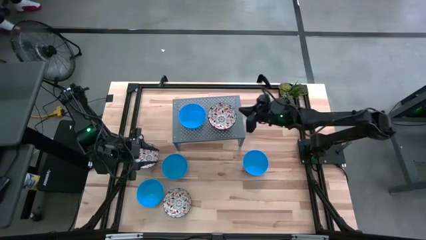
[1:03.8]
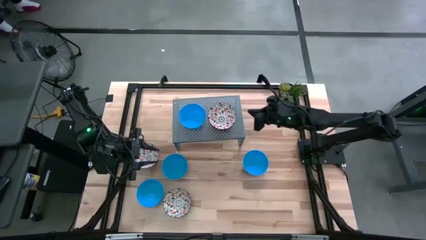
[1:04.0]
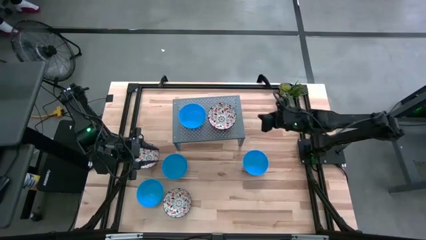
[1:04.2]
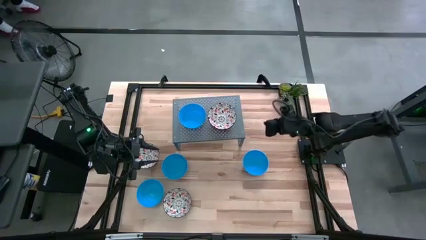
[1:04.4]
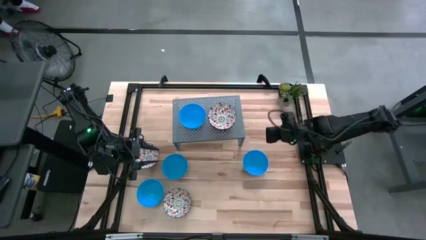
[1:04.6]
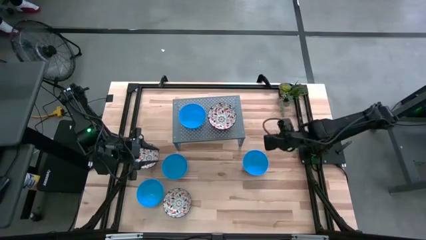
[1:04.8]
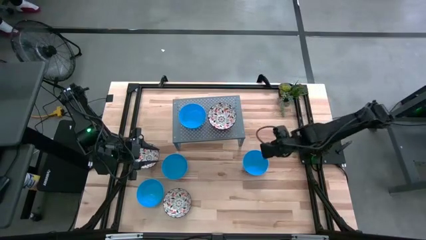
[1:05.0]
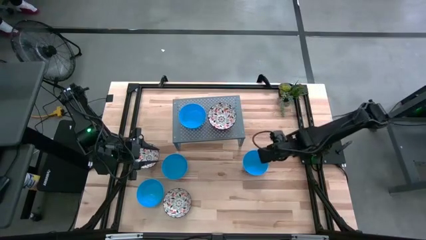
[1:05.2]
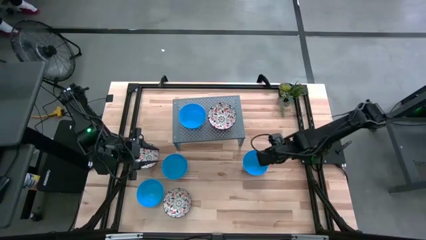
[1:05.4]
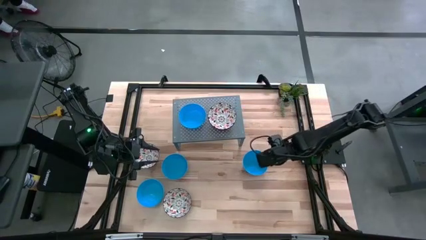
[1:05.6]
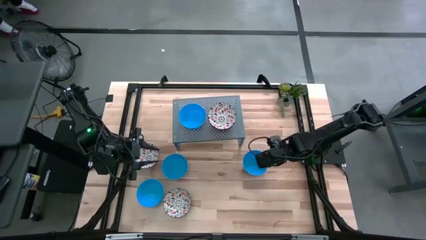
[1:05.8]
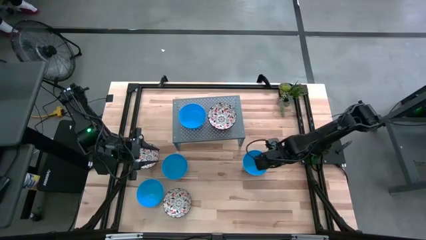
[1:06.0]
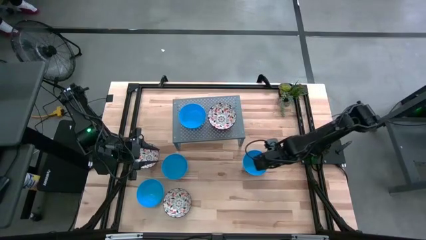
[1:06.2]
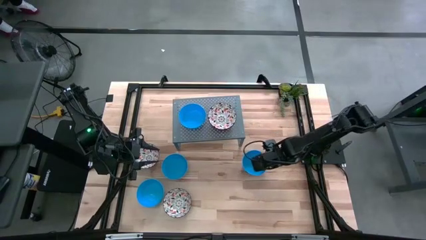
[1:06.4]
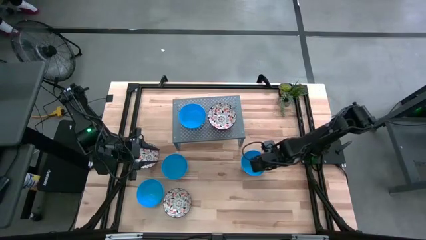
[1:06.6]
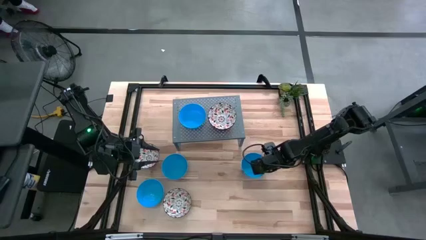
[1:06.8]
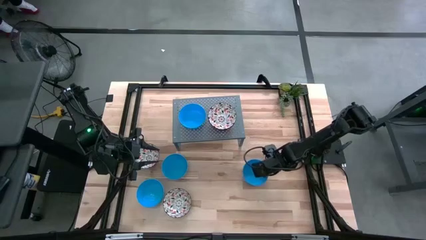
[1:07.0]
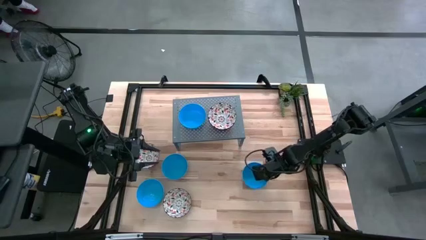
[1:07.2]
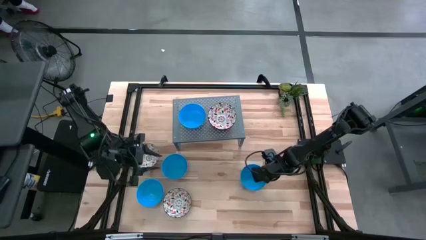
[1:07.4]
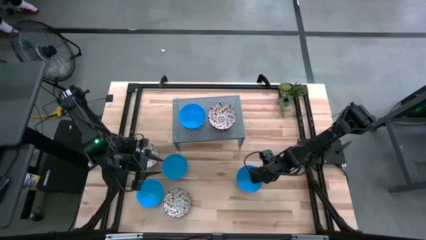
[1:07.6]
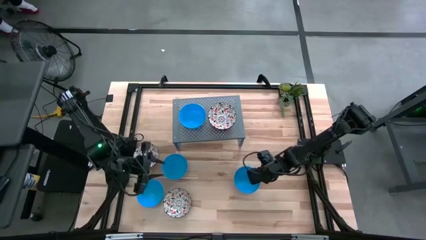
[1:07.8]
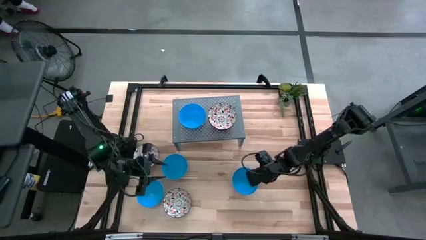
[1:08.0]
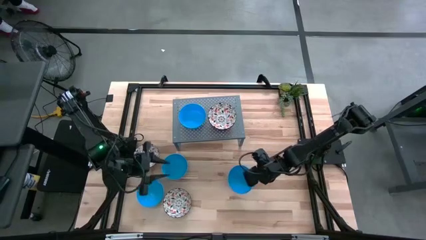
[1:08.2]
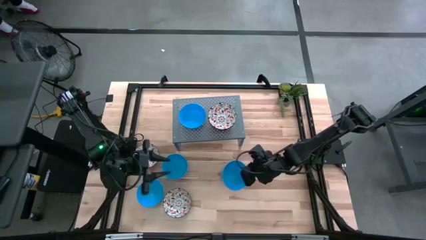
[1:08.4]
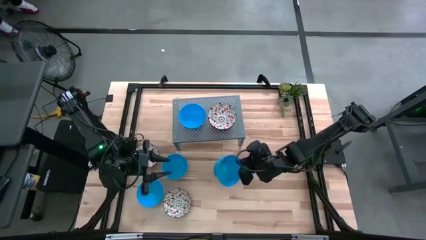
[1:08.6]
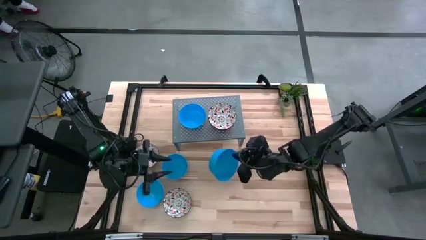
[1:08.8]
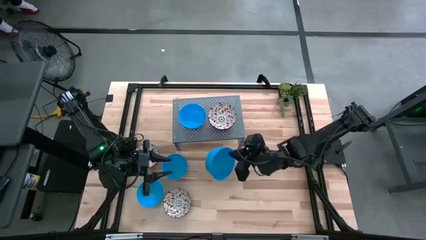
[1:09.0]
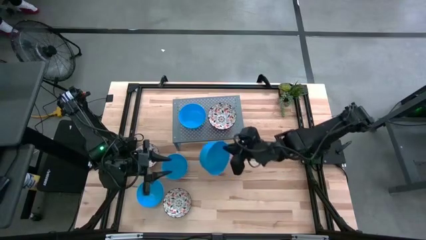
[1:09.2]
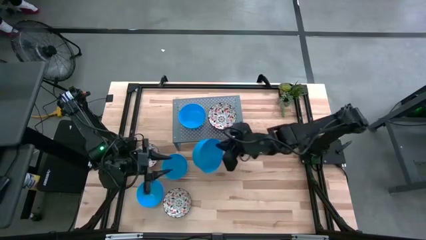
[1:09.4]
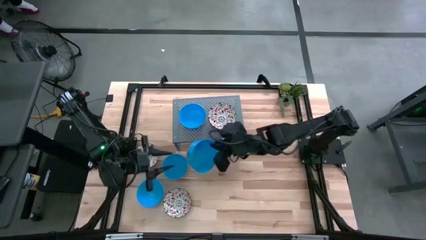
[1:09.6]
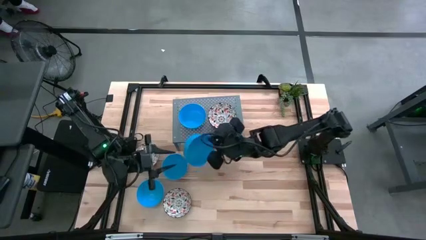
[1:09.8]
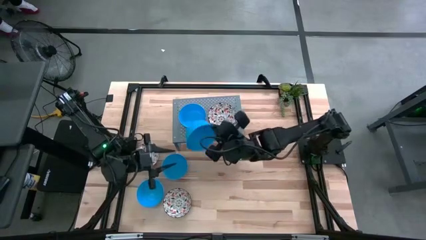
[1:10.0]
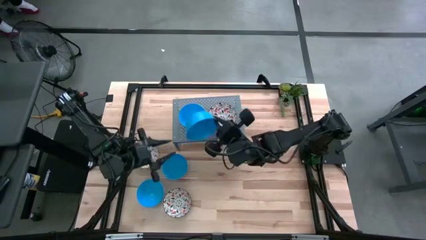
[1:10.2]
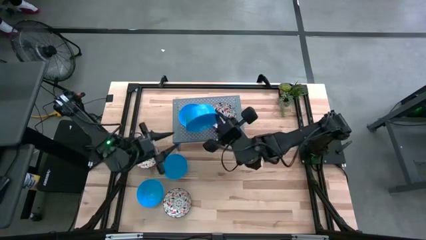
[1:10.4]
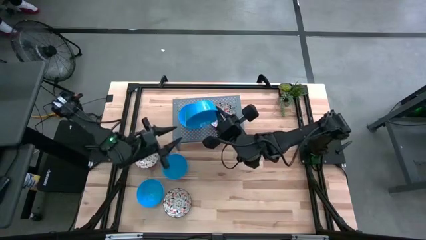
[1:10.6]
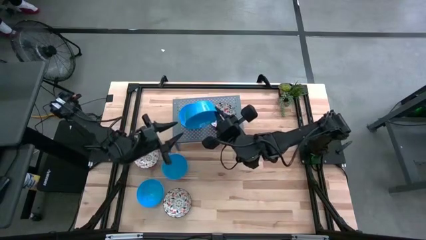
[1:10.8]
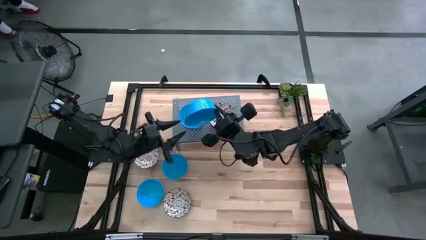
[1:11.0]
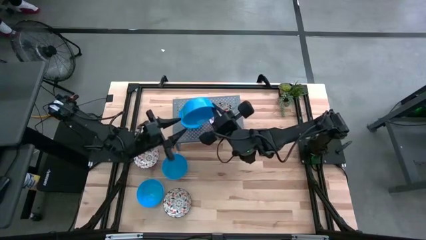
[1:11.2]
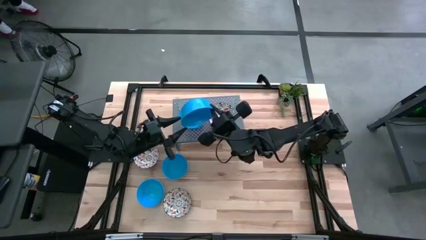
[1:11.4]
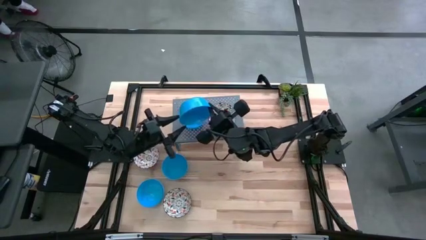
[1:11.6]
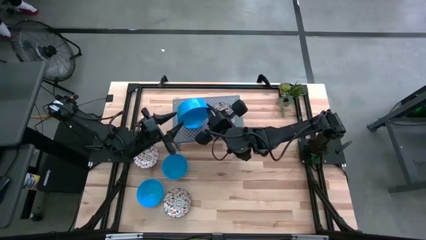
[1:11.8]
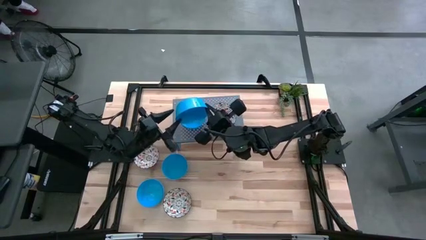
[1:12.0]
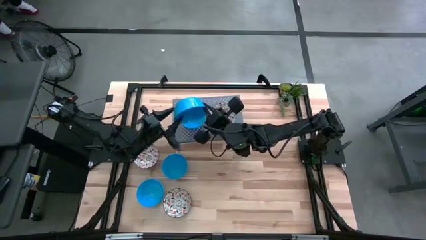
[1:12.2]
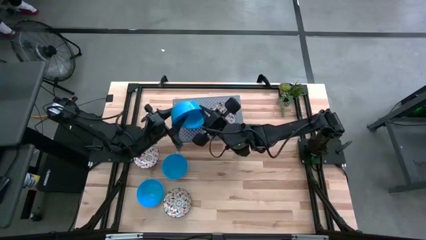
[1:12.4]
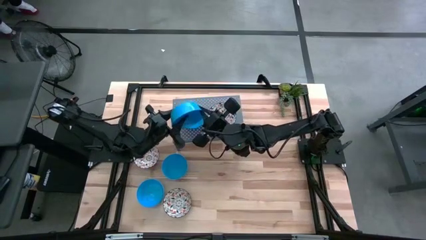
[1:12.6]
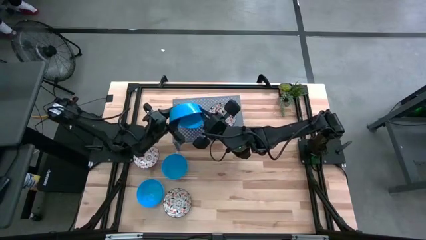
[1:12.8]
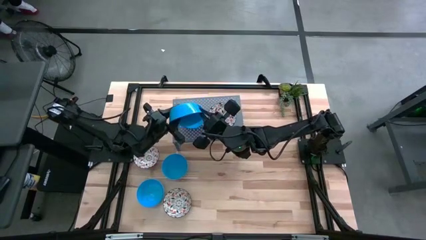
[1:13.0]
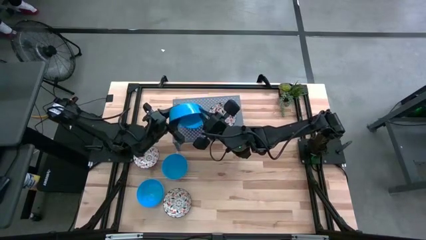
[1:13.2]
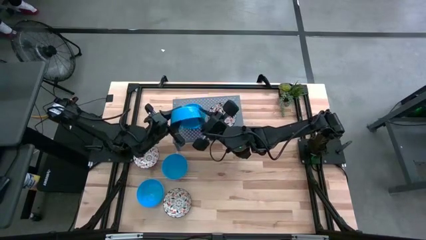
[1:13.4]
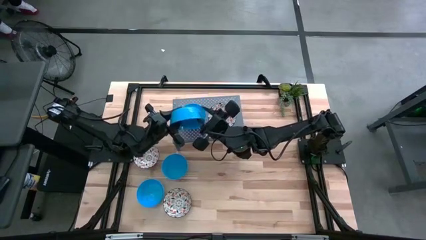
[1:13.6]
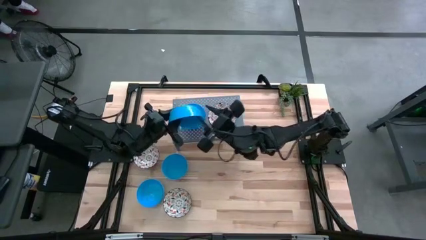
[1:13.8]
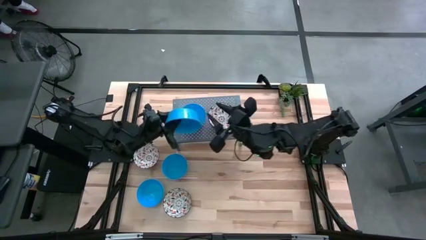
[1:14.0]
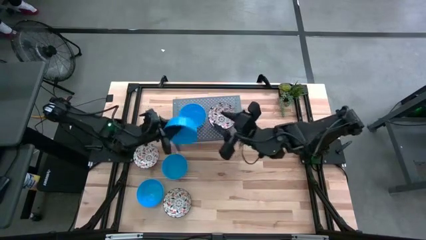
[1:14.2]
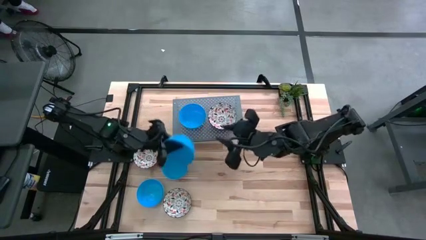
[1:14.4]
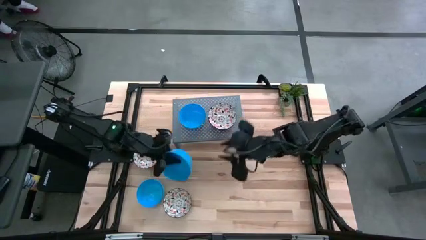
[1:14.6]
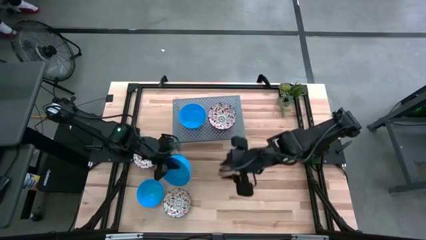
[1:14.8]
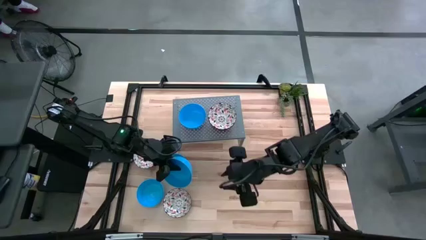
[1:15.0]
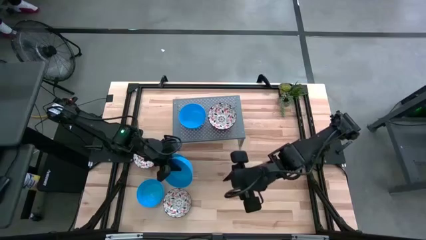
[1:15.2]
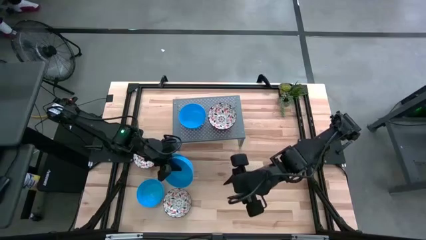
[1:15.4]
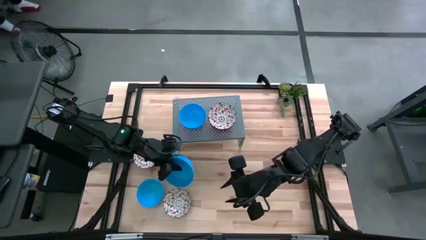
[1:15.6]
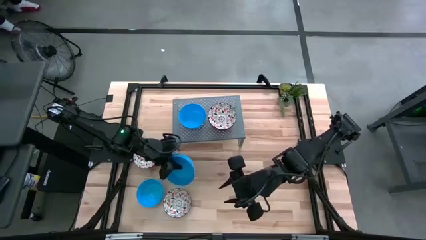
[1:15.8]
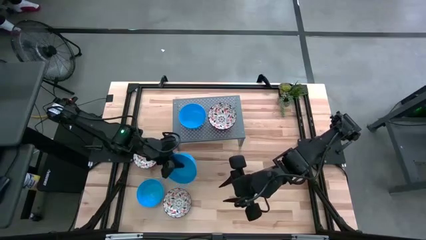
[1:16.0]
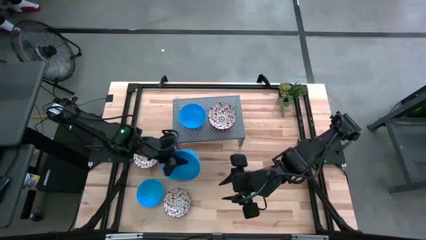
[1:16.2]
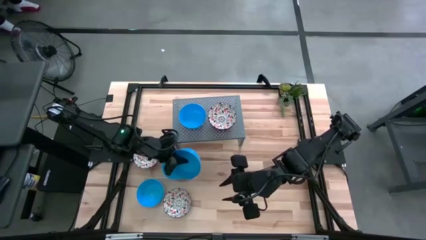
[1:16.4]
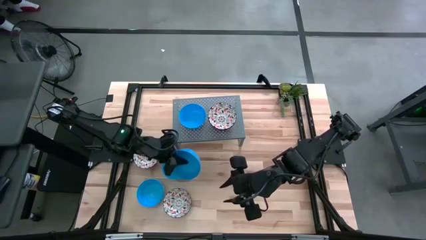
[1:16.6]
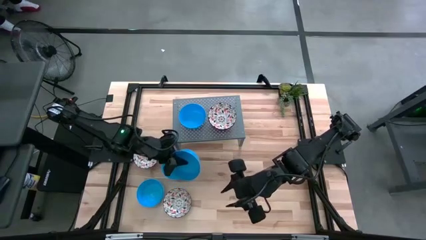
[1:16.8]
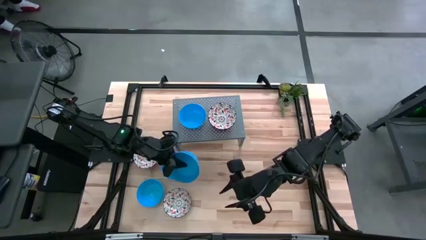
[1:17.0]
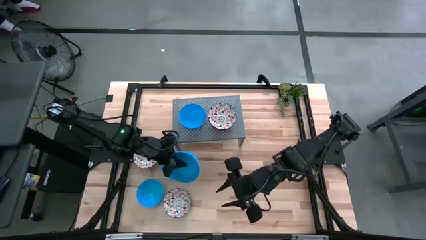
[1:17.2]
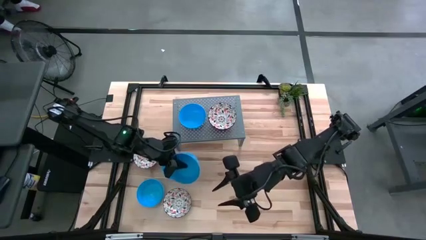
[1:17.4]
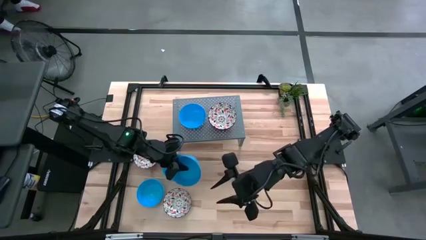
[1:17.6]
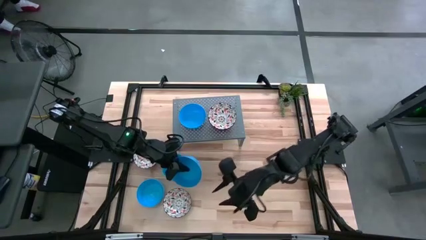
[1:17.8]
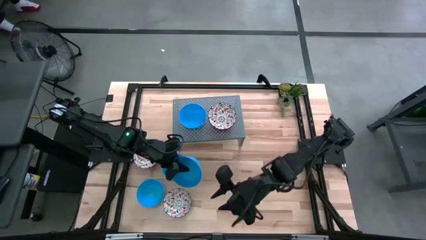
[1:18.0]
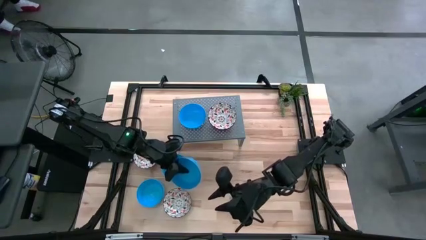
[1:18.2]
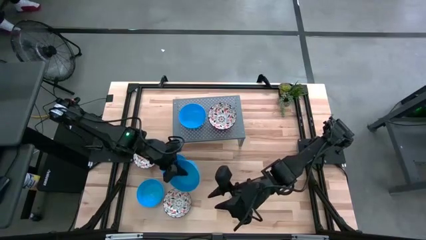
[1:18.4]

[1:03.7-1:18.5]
Task: Pick & Place Mini bowls
Stack the blue bowl on top of the blue bowl on the shelf

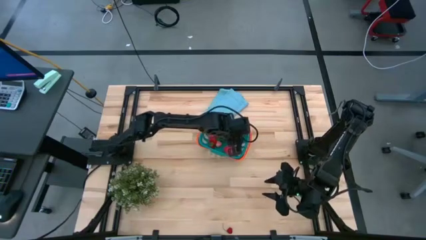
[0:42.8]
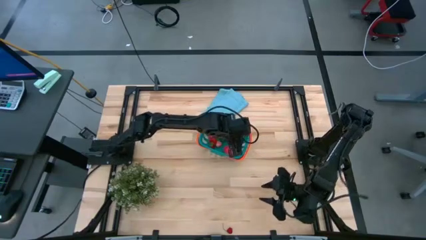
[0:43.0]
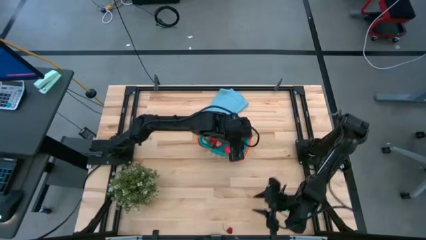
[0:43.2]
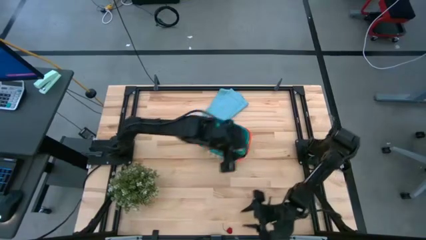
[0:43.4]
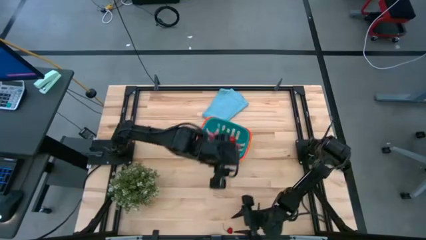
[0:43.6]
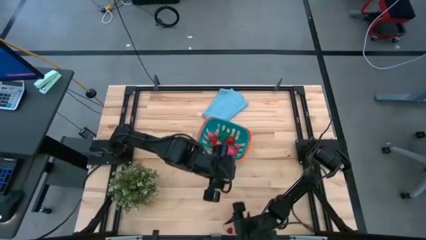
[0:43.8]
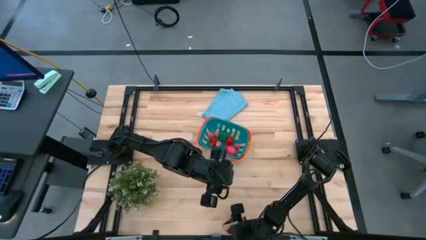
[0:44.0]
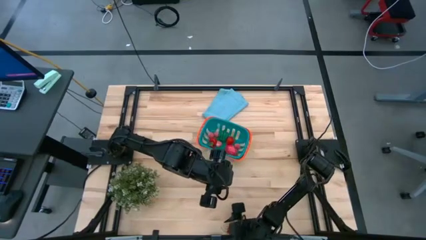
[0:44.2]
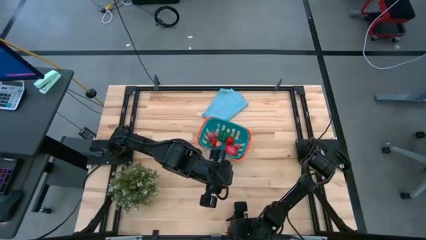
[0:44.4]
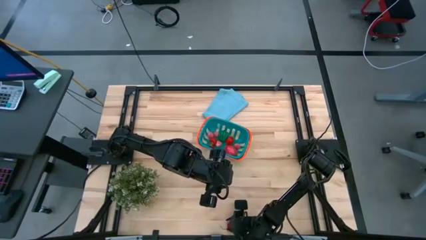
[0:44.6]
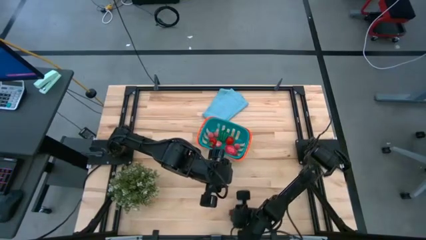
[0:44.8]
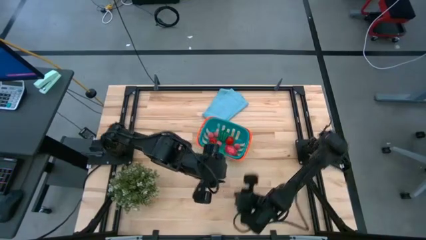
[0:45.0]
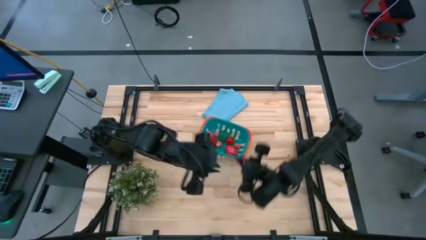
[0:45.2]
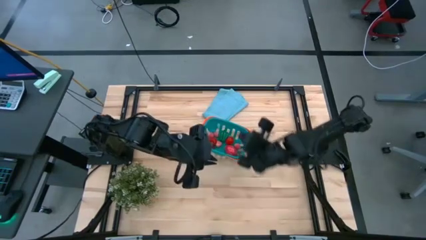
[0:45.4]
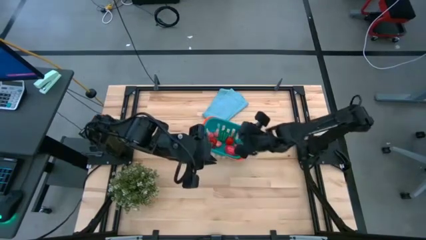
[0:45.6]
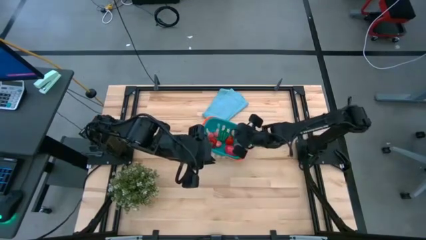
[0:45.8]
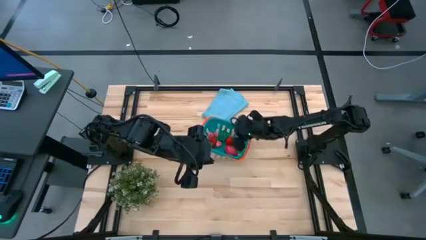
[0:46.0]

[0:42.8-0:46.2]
Task: Pick and placing Produce into tupperware
Put the red cherry into the bin
